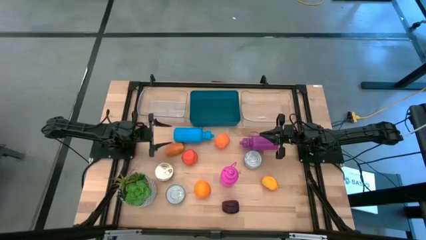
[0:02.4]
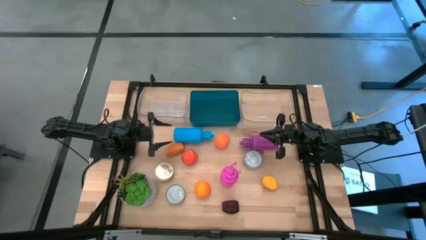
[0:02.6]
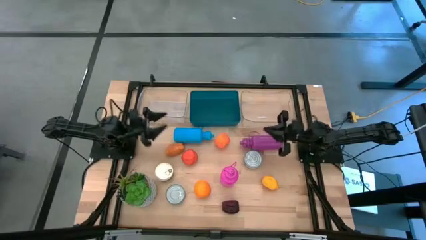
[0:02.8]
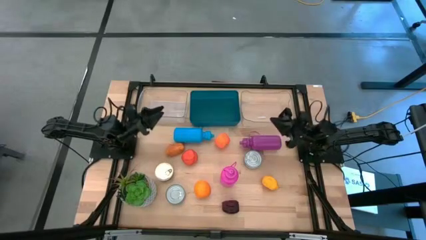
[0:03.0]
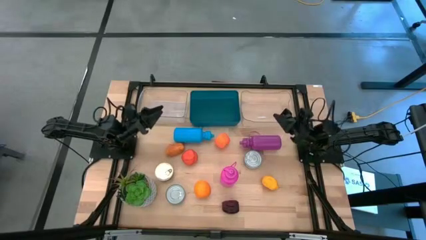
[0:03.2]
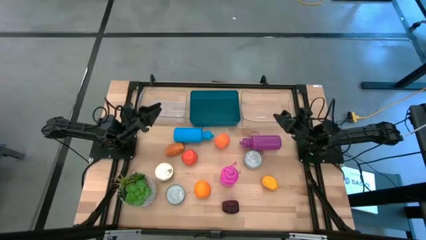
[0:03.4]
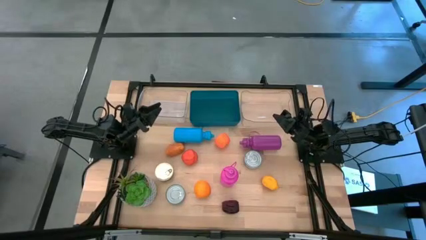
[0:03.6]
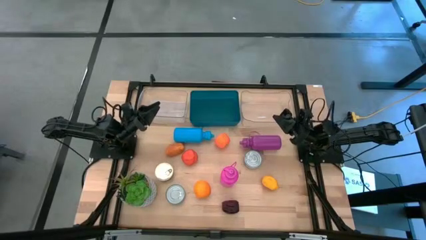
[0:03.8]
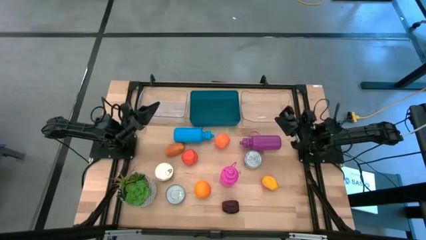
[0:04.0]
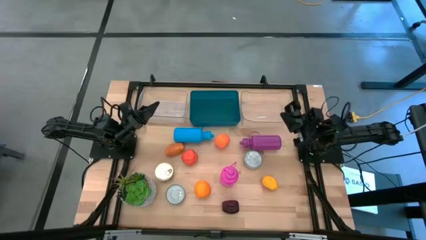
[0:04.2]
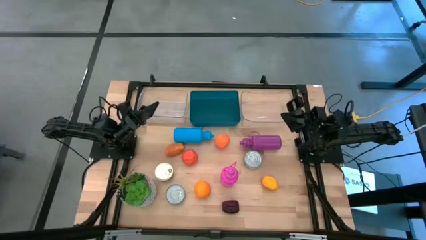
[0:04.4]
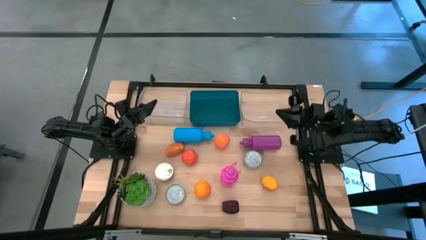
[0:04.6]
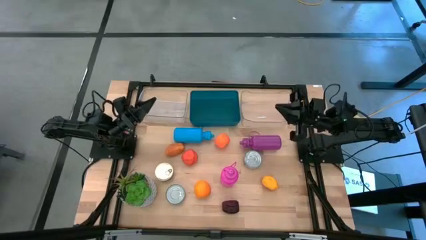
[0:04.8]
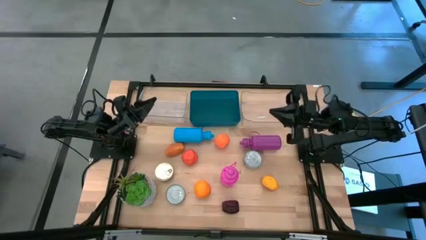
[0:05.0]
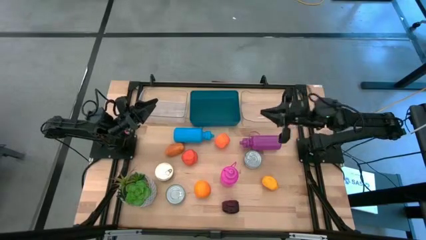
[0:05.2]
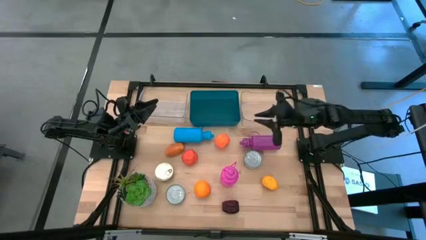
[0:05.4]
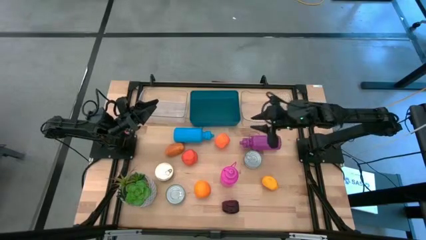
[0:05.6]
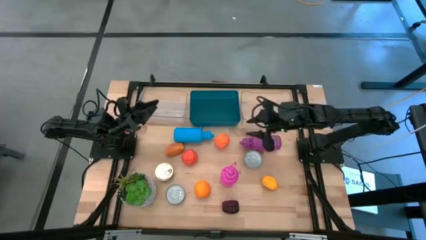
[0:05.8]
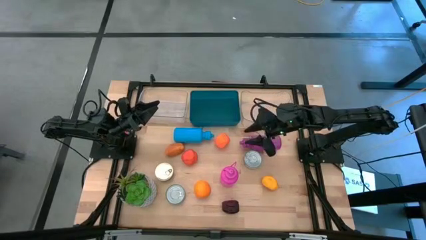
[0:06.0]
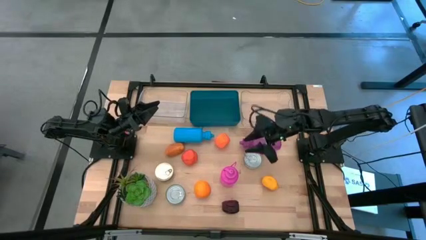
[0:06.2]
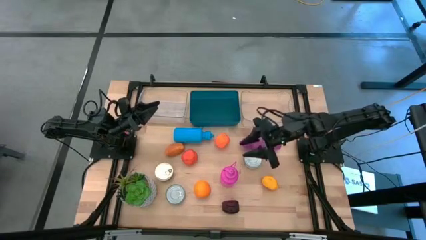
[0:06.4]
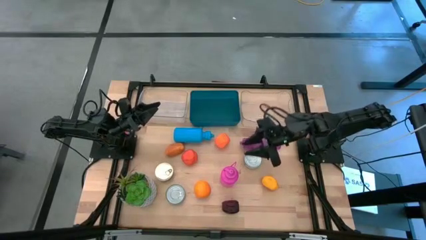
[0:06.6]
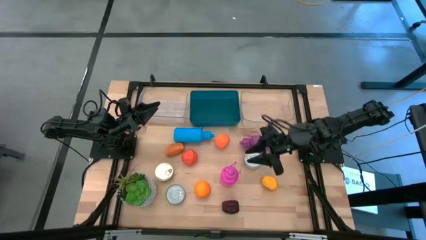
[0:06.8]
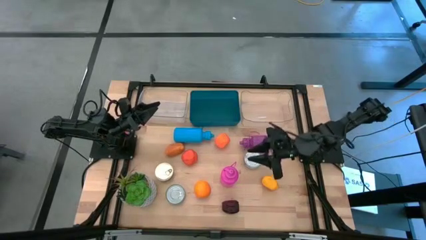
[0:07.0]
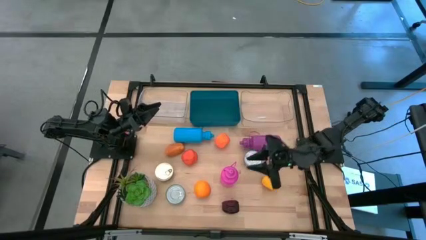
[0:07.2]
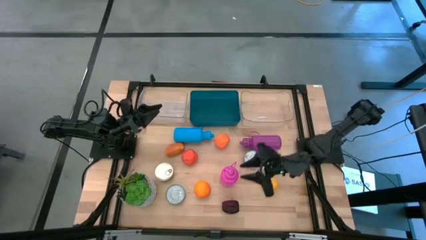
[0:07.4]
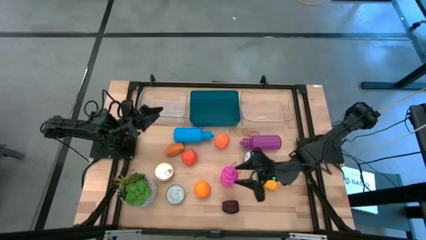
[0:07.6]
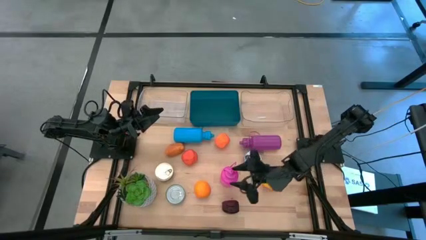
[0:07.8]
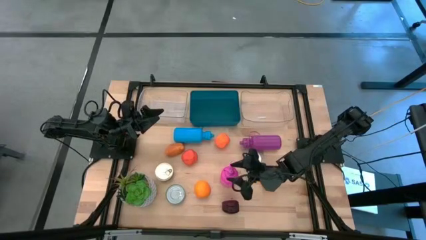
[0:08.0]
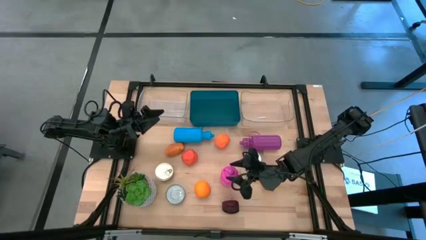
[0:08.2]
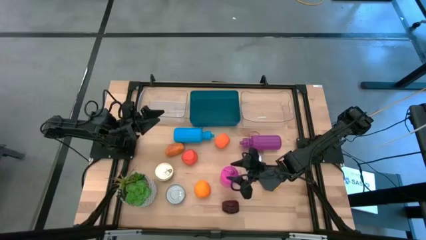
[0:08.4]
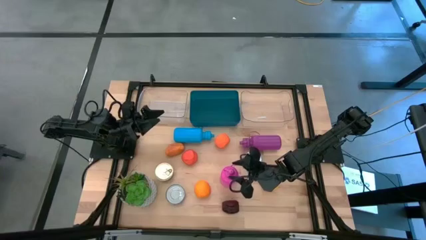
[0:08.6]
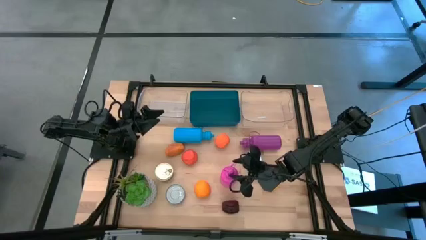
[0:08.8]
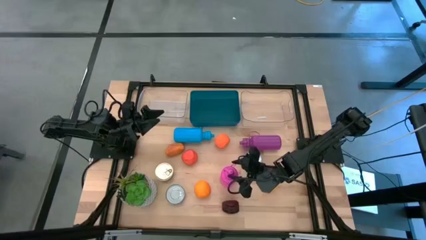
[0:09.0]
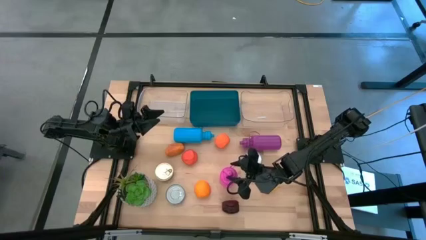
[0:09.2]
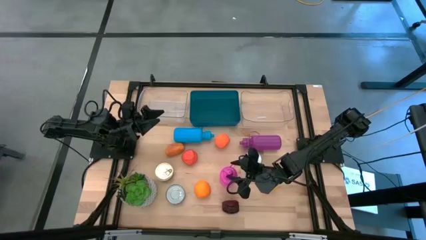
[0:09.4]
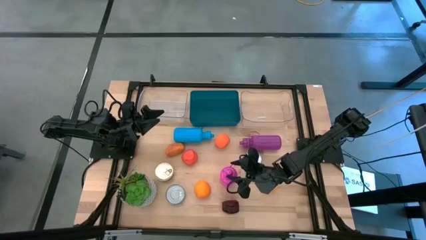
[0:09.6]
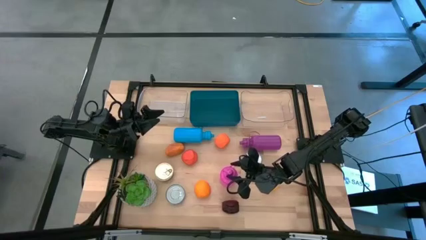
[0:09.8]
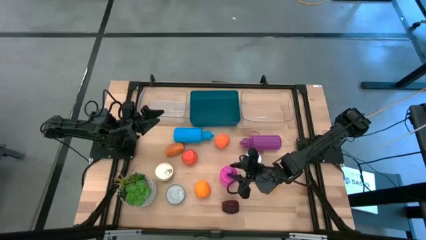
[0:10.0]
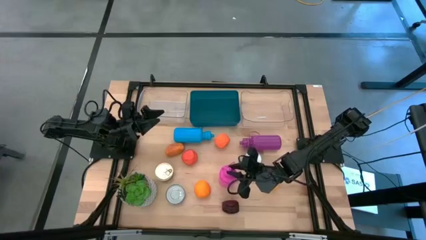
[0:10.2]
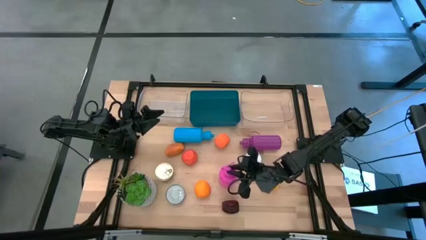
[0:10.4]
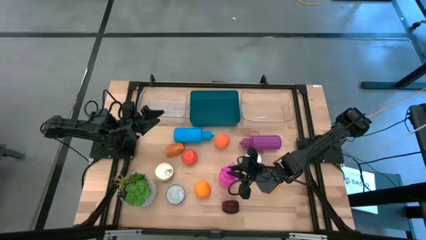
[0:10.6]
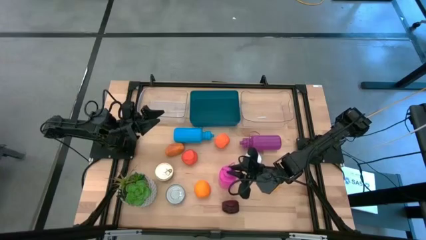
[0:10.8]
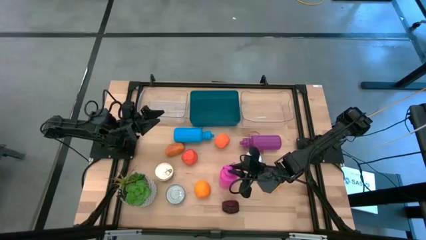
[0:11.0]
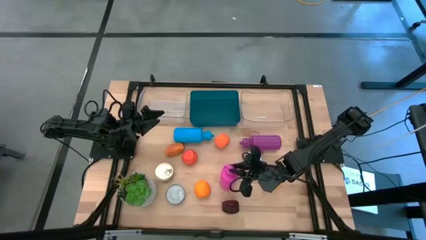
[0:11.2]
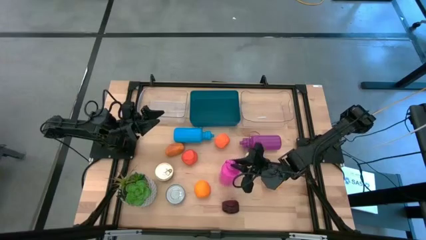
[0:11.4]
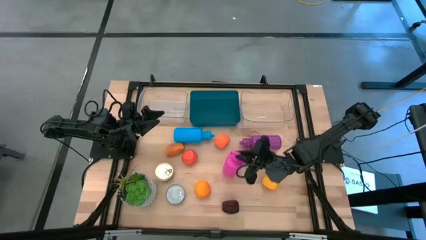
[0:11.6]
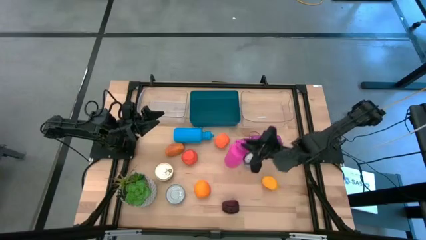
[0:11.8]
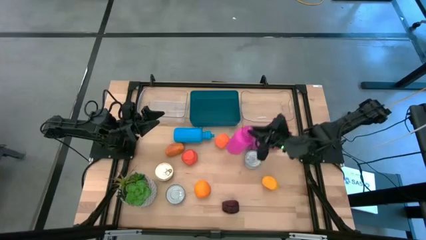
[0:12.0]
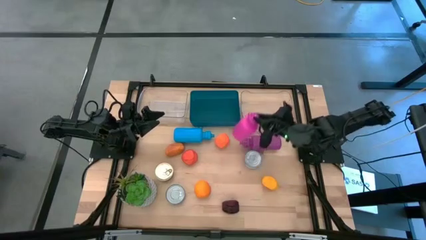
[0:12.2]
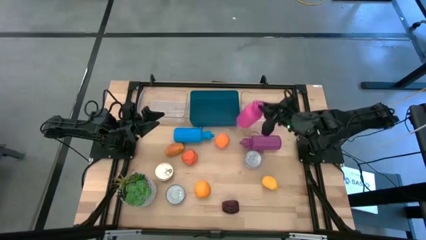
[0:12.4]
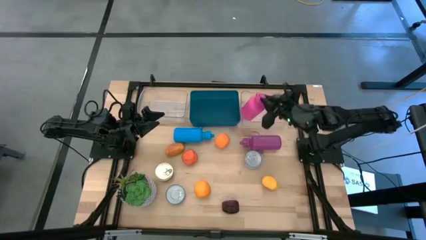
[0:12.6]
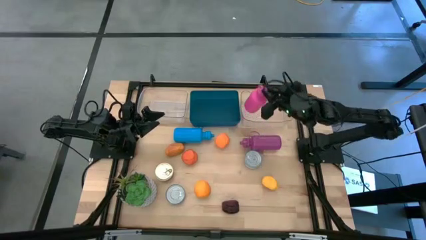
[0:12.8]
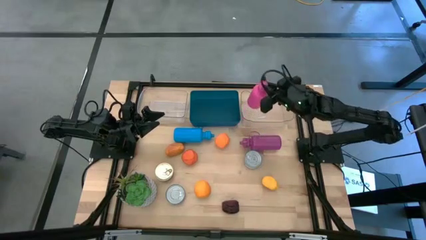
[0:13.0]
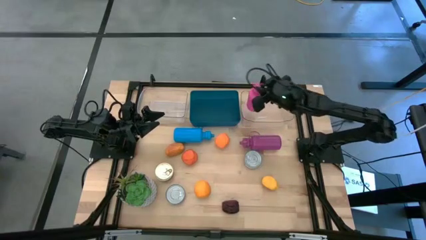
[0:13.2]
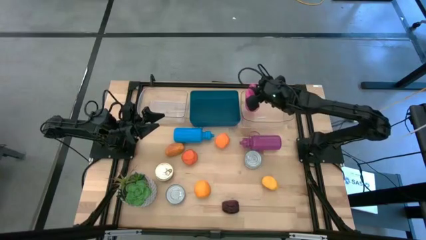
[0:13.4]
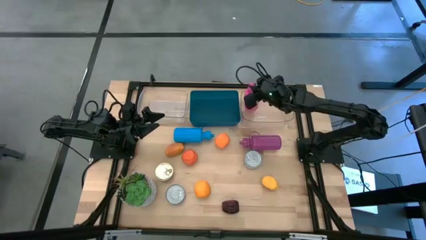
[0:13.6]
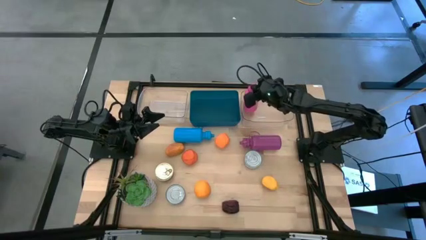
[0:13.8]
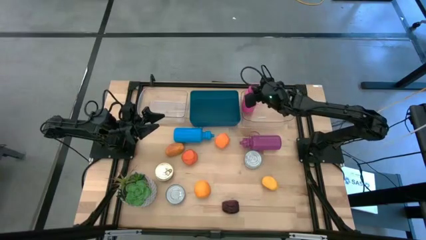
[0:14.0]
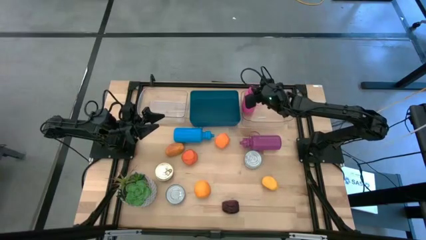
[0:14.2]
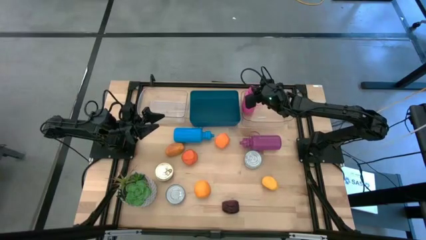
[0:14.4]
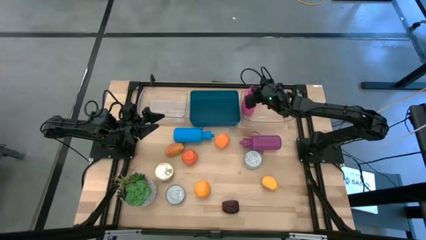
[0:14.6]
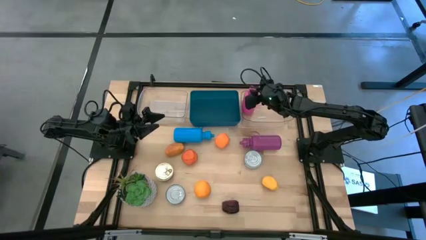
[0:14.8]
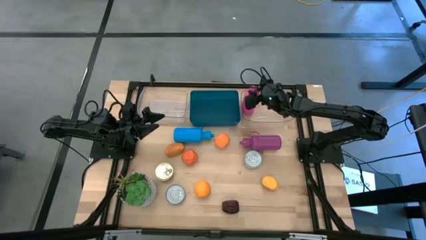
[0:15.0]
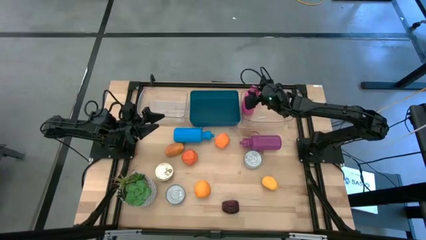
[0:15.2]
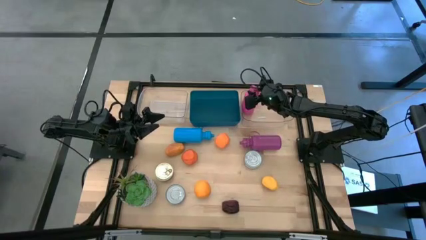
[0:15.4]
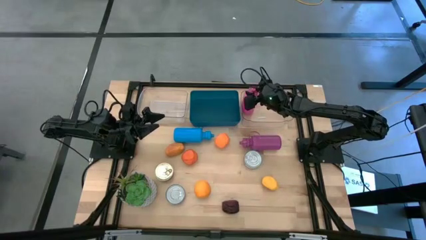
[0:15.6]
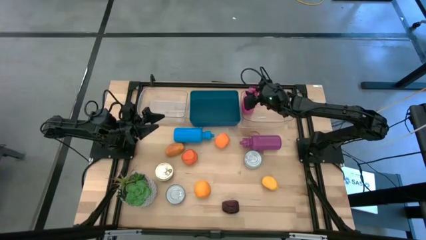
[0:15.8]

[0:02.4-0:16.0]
Task: Pick & Place Food Item
Put the pink tumbler into the right transparent bin
